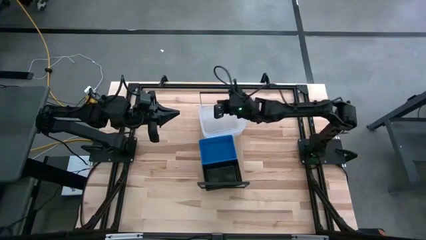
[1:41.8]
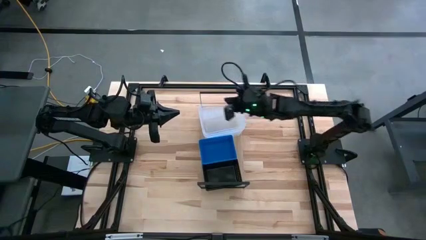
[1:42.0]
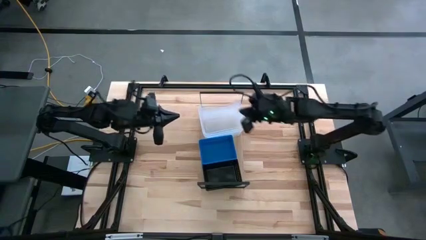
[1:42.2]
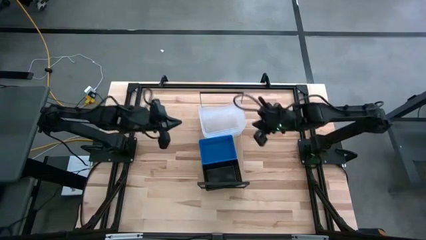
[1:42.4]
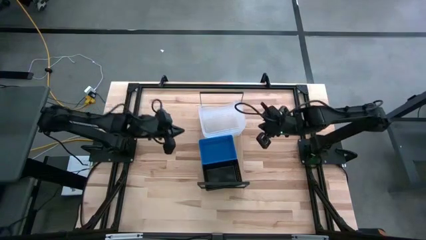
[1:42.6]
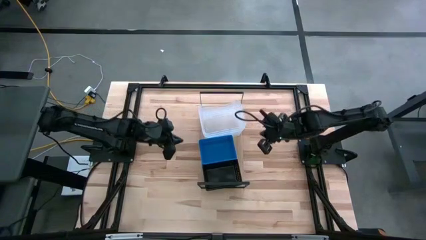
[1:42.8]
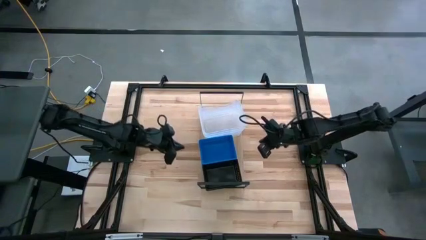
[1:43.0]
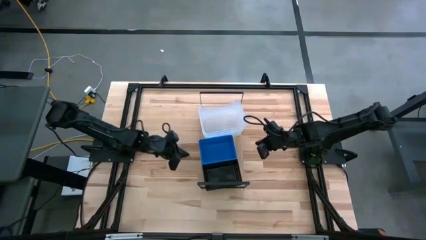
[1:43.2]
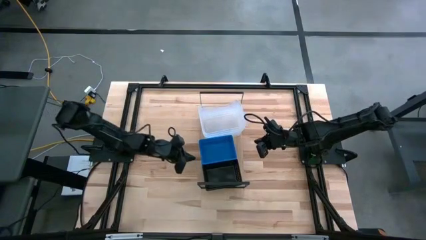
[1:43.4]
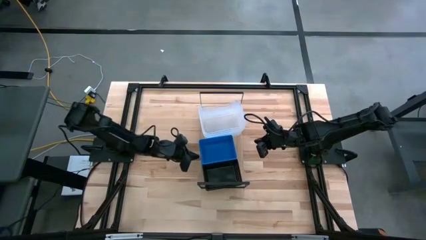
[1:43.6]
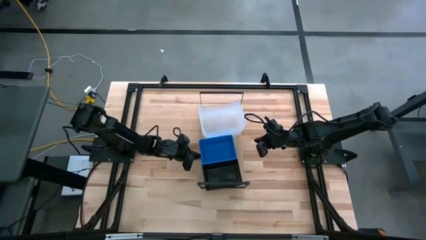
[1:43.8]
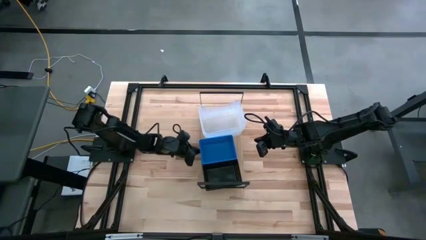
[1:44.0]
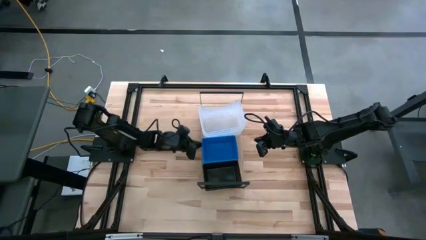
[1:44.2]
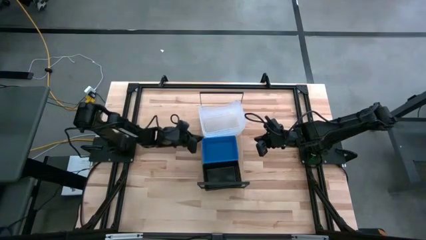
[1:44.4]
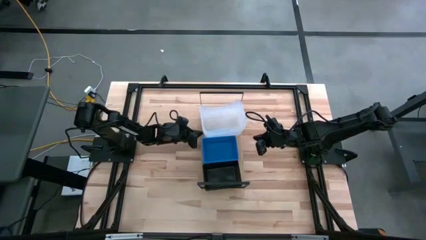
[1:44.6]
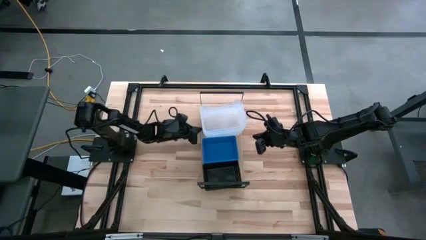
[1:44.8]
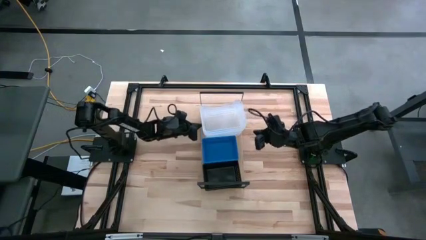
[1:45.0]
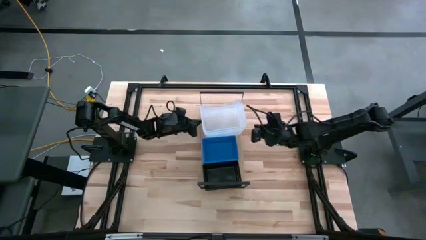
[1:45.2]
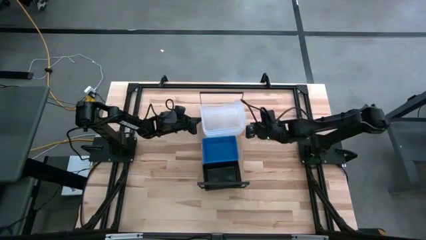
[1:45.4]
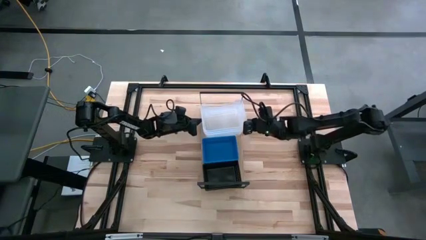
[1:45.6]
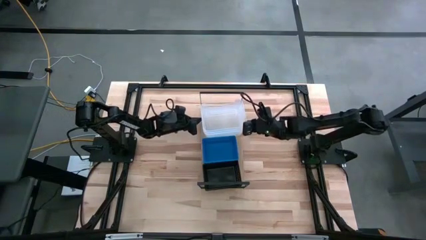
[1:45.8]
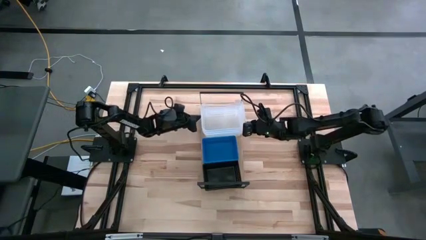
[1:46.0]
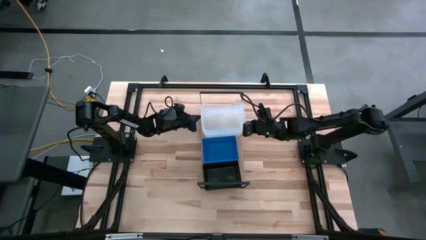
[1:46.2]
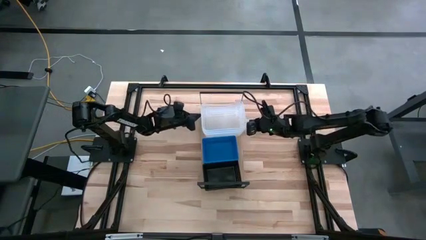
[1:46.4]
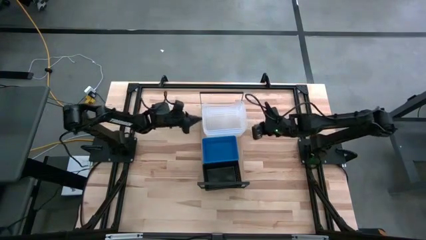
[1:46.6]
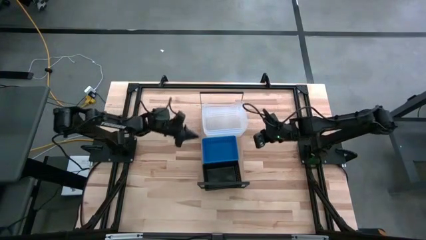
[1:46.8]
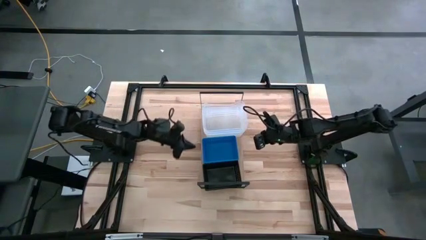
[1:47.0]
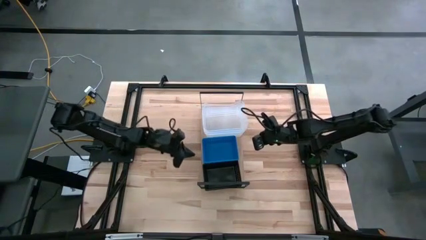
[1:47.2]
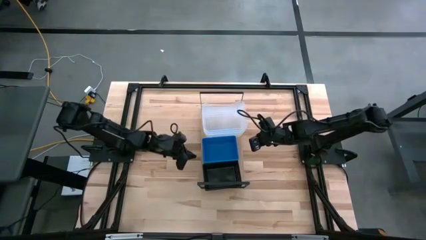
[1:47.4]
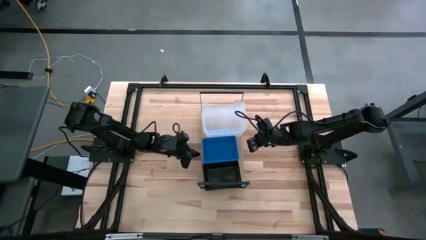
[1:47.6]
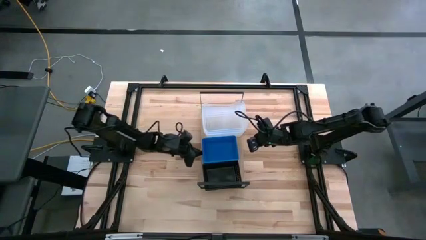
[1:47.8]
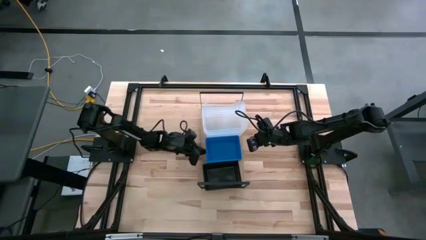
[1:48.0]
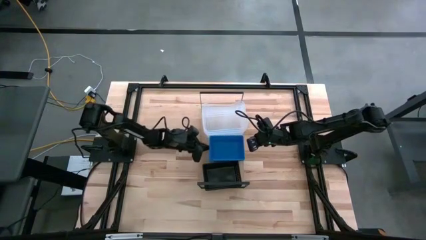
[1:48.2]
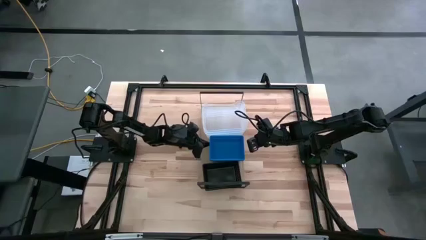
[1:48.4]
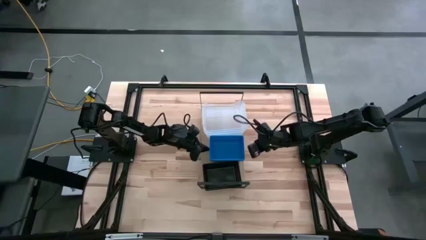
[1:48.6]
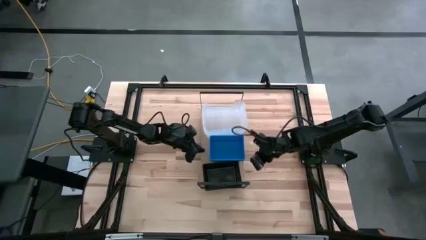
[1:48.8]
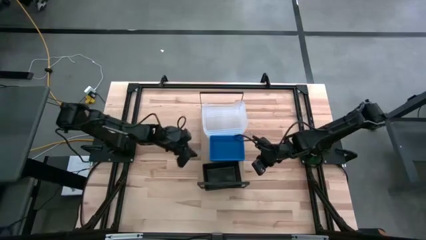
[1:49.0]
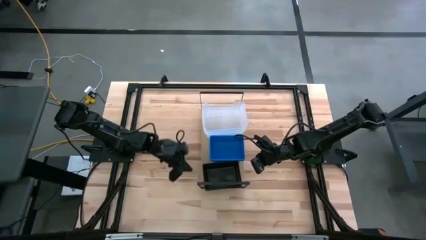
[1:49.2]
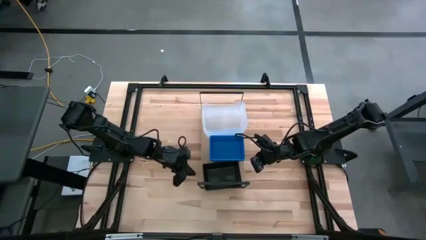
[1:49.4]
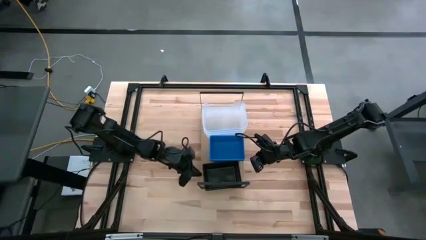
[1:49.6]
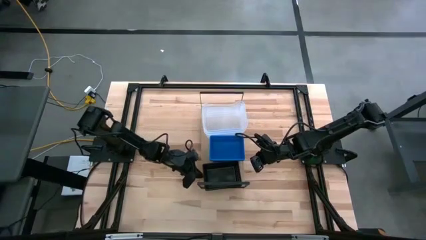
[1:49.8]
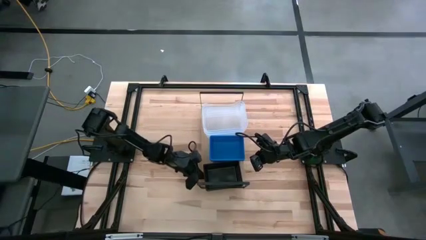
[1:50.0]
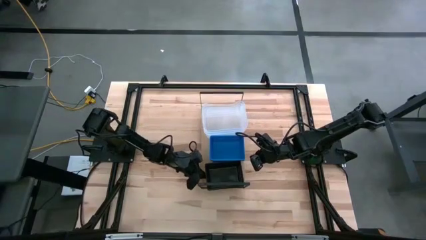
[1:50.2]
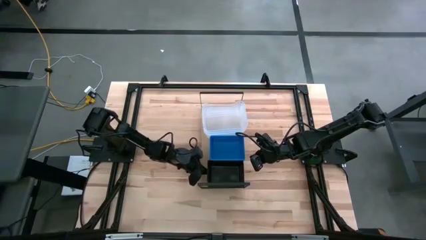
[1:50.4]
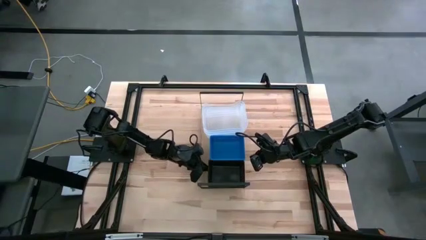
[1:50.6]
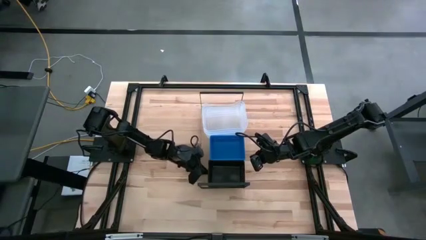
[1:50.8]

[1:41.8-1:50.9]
Task: Stack baskets on shelf by color
Adjust the bins on the shelf

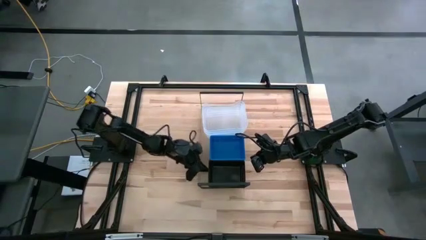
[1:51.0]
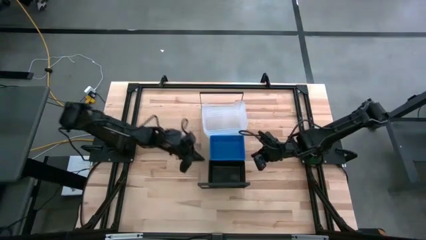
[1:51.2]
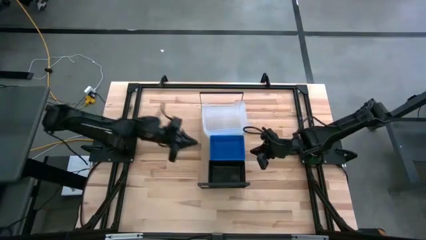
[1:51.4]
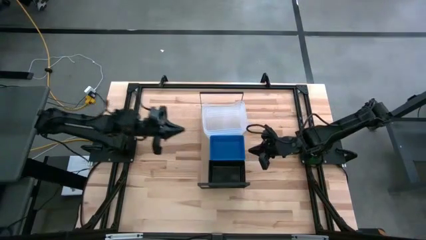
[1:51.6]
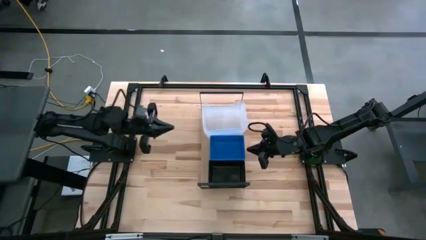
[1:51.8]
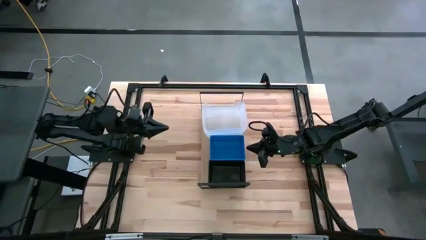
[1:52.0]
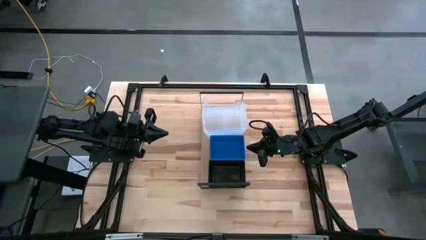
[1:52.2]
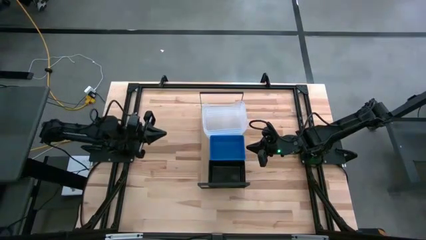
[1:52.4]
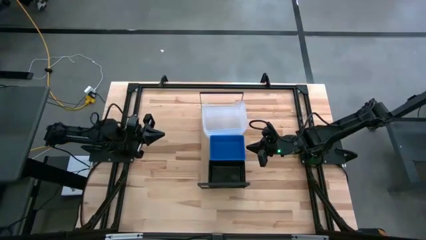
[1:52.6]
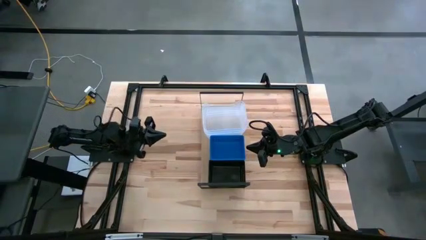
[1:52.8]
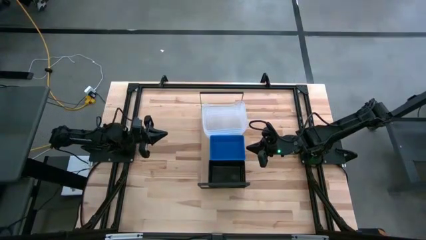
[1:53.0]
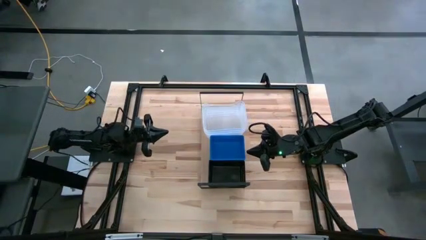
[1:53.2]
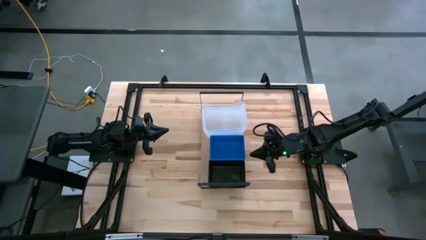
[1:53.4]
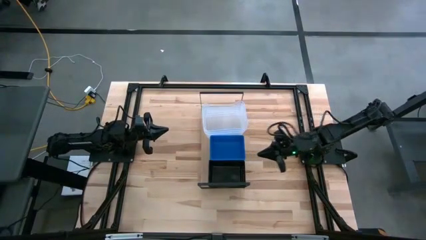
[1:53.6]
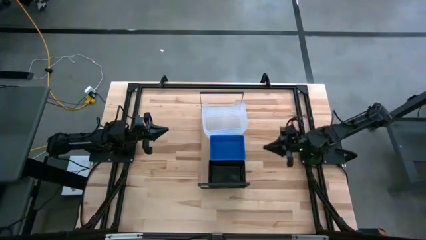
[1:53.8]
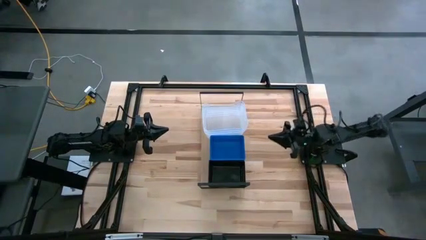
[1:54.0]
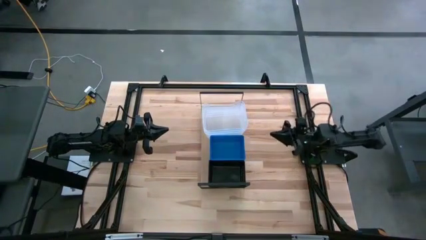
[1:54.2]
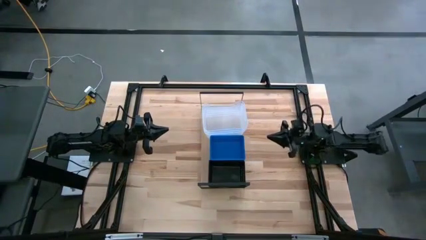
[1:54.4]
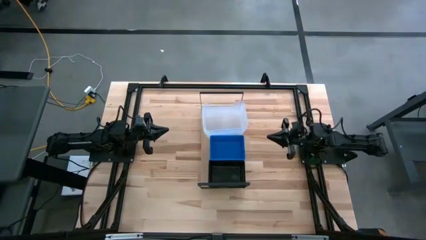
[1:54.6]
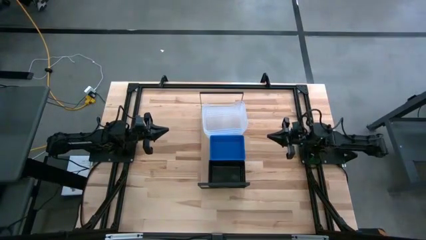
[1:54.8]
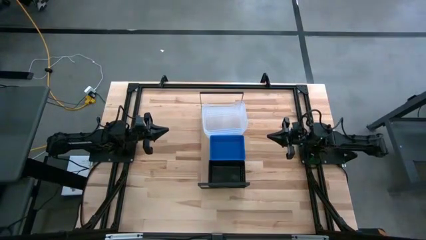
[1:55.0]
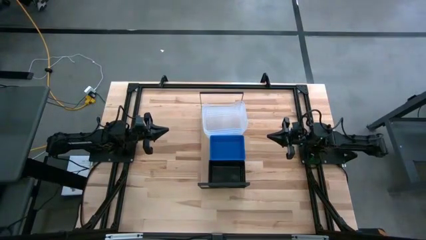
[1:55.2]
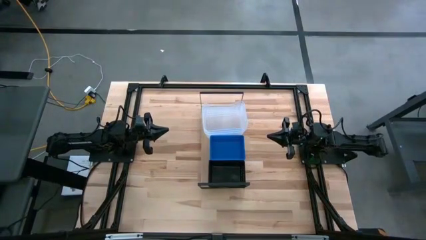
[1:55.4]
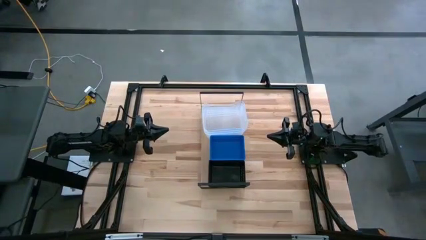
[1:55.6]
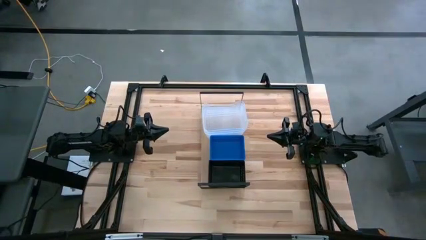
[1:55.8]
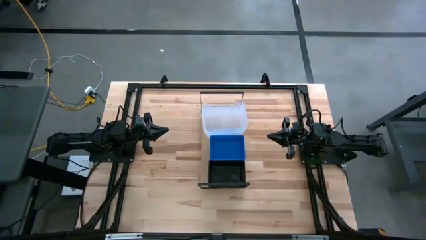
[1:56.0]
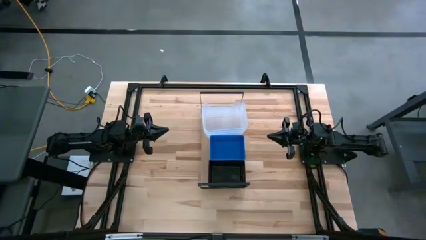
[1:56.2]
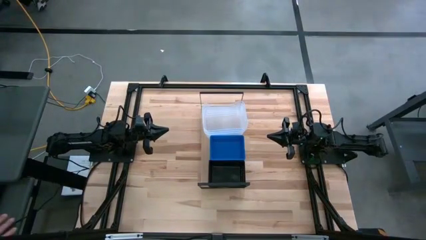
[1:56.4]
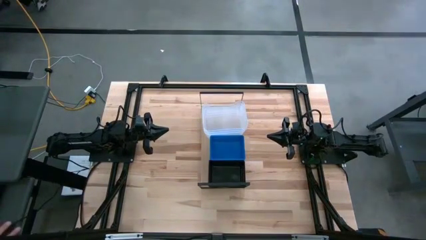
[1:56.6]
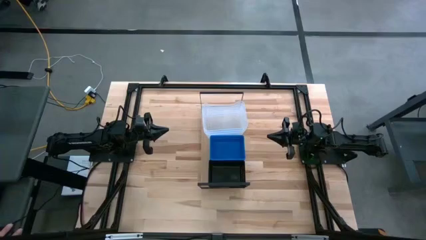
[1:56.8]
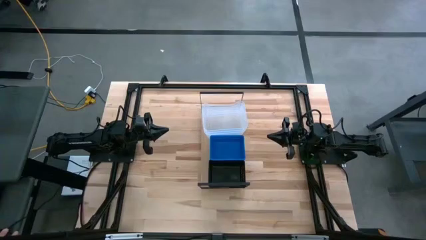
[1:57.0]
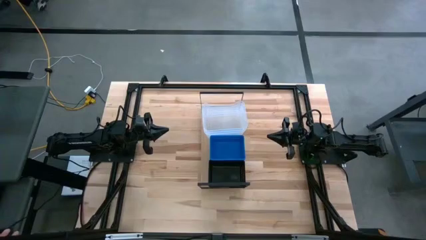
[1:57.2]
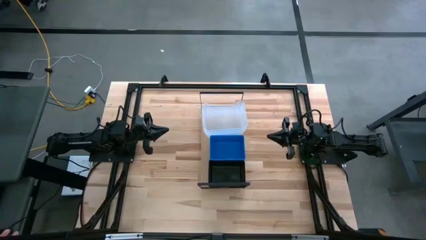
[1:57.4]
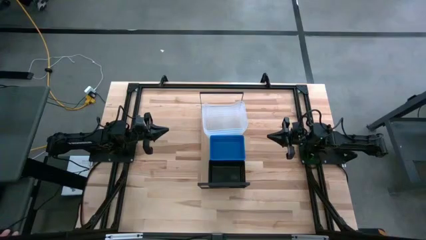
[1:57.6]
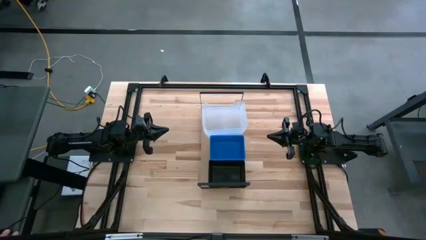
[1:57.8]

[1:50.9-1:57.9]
Return to Home Position
